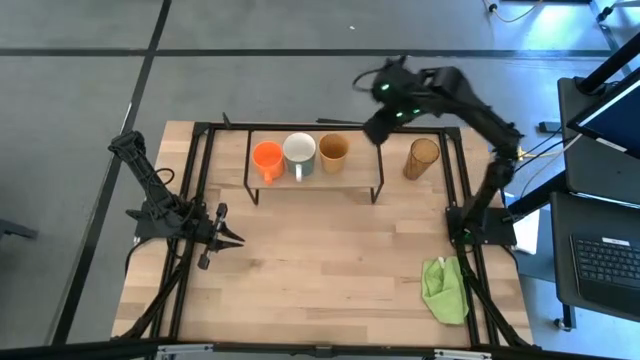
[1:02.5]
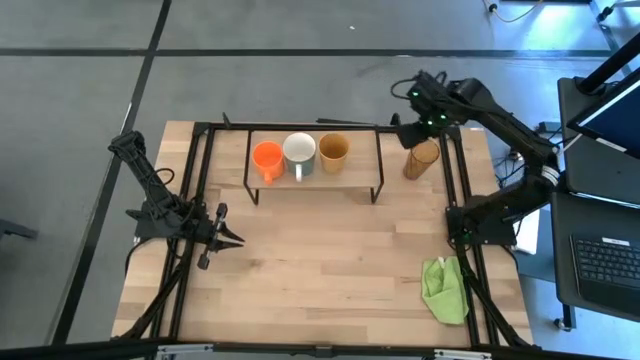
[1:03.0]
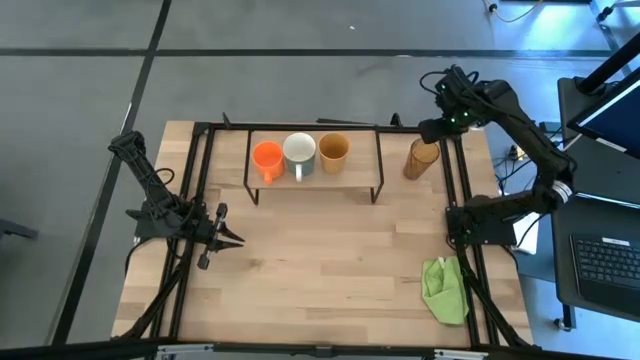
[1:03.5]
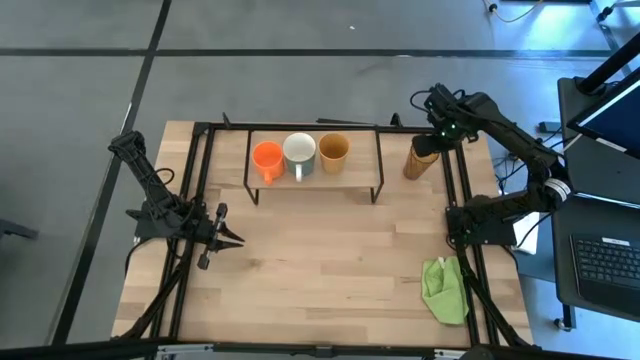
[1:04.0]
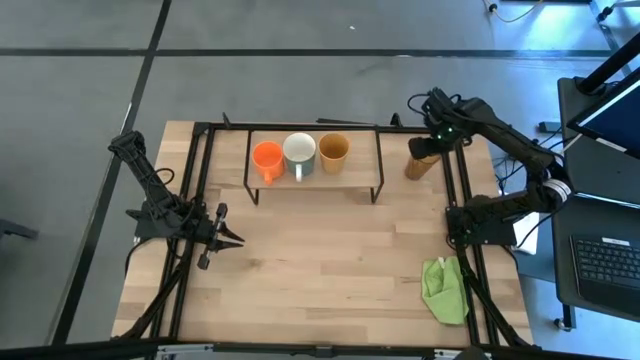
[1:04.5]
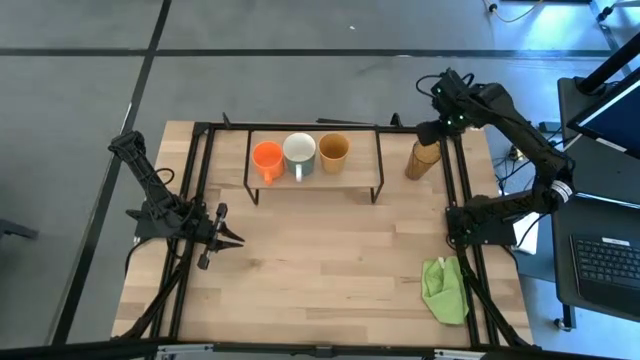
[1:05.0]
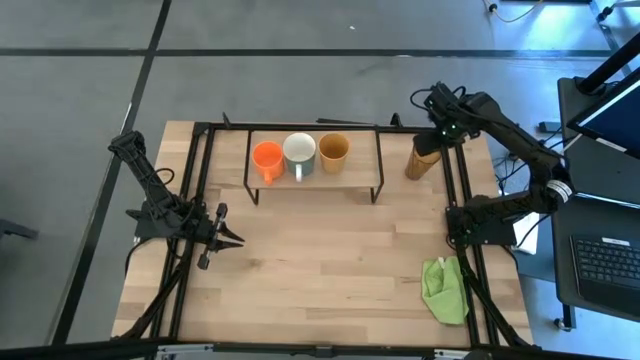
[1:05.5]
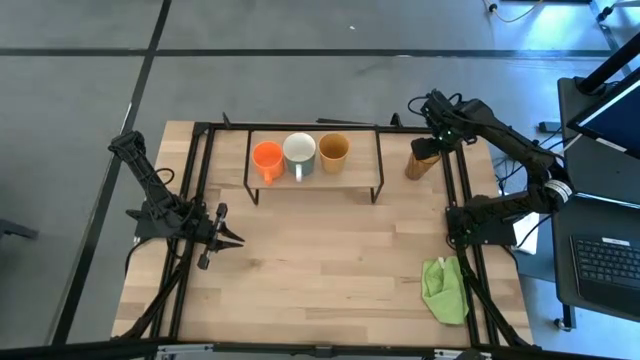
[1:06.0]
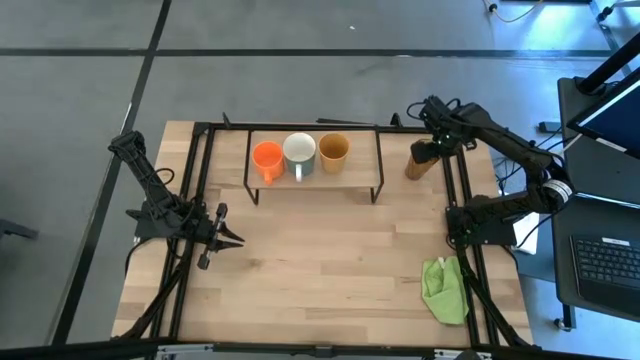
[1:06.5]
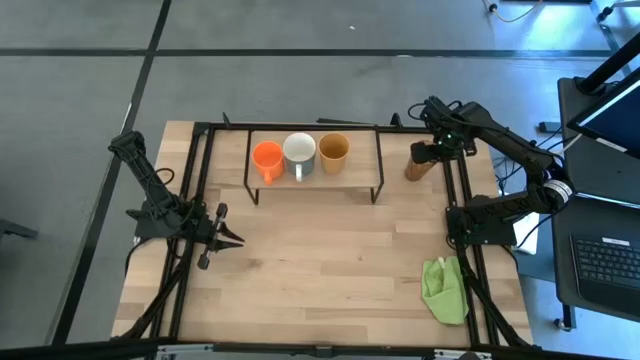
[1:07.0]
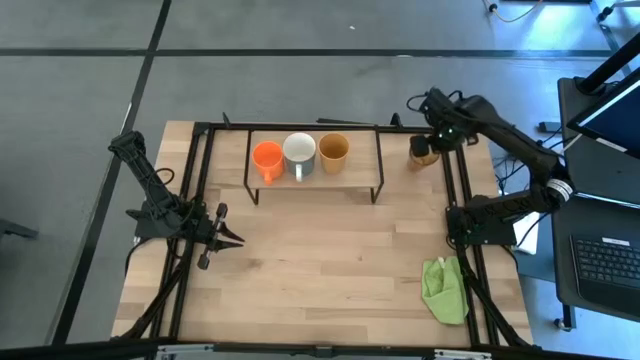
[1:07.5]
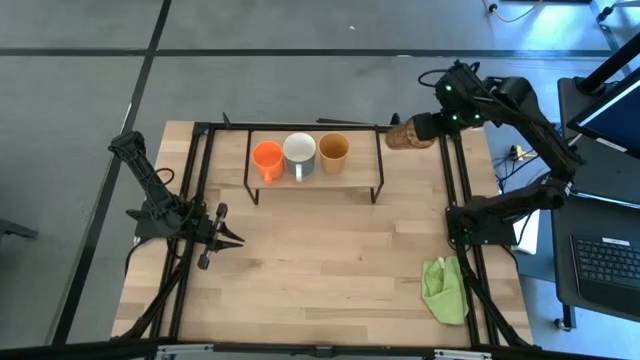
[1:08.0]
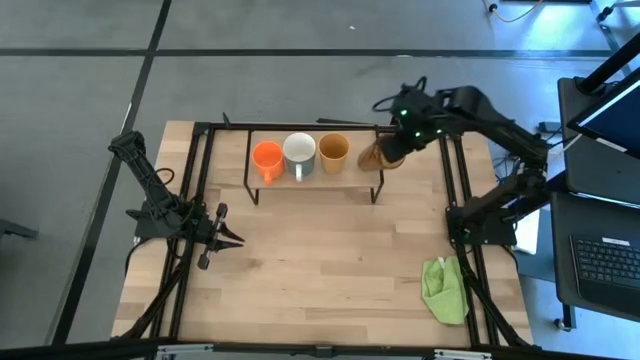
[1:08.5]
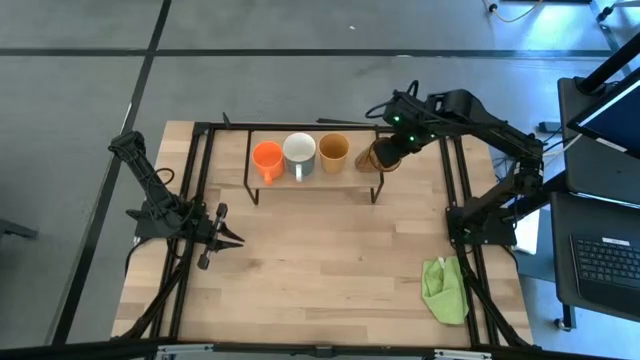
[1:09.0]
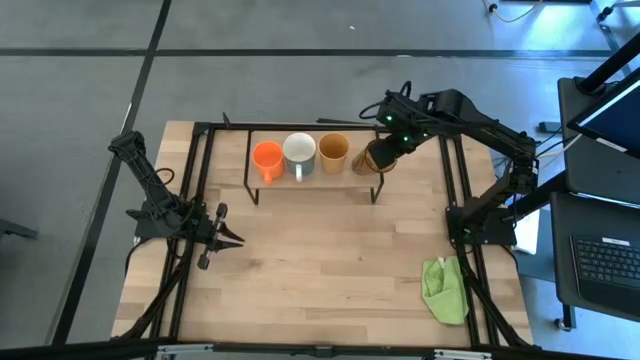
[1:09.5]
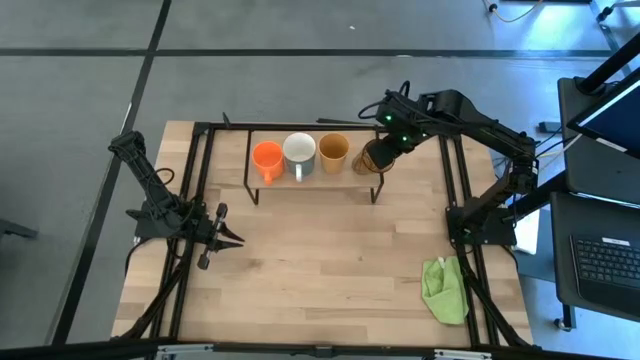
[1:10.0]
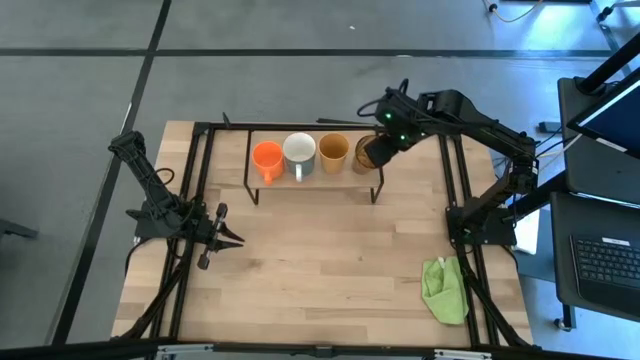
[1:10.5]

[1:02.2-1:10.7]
Task: Stack small to large cups/mugs on shelf
Put the brown cup on the shelf

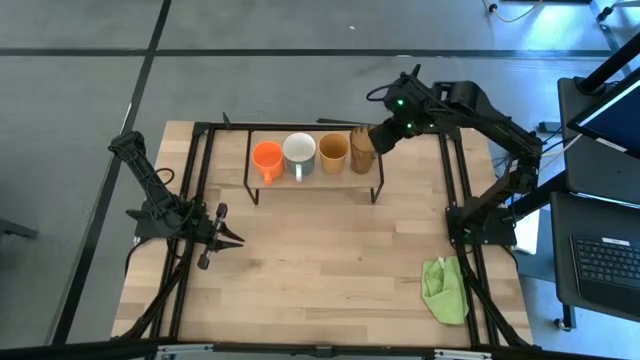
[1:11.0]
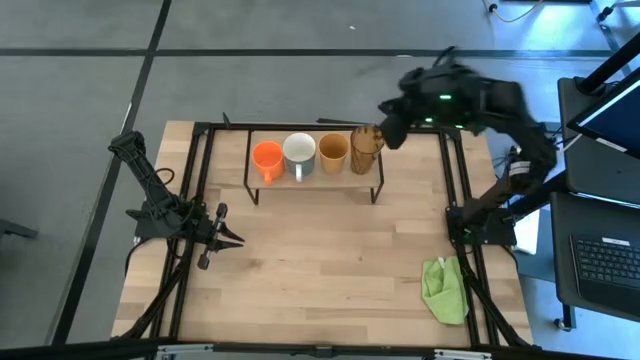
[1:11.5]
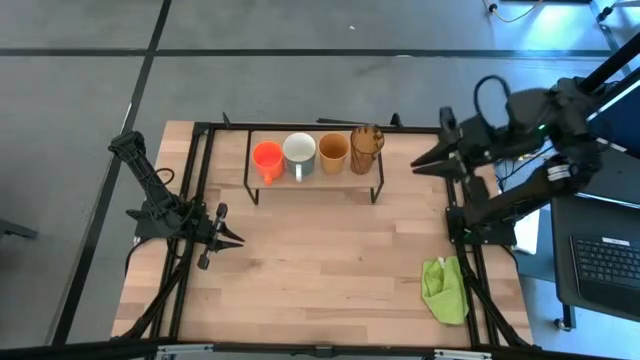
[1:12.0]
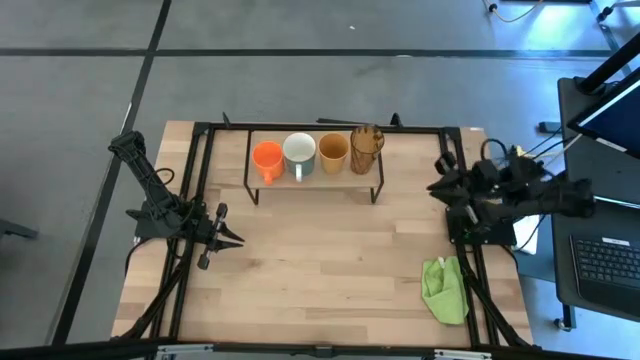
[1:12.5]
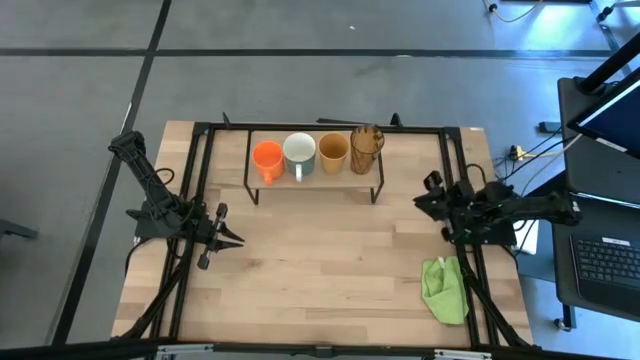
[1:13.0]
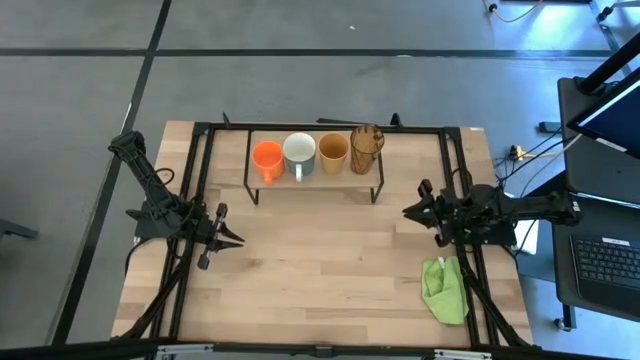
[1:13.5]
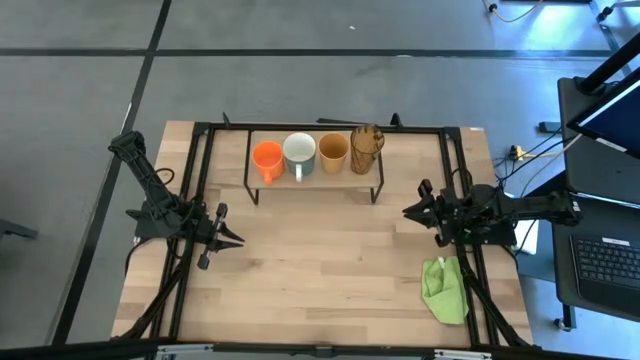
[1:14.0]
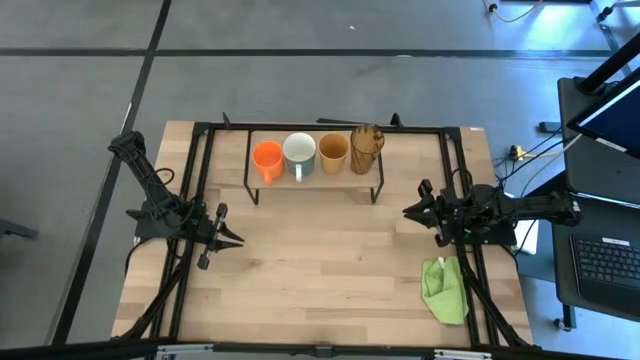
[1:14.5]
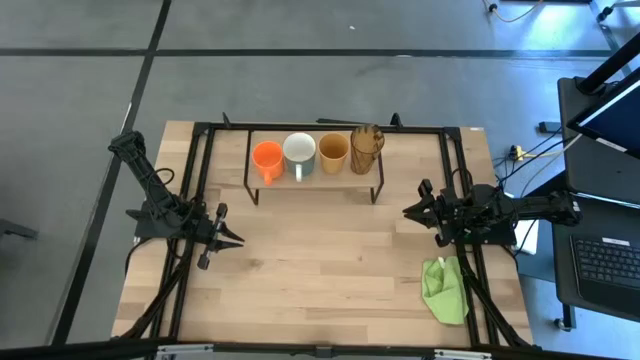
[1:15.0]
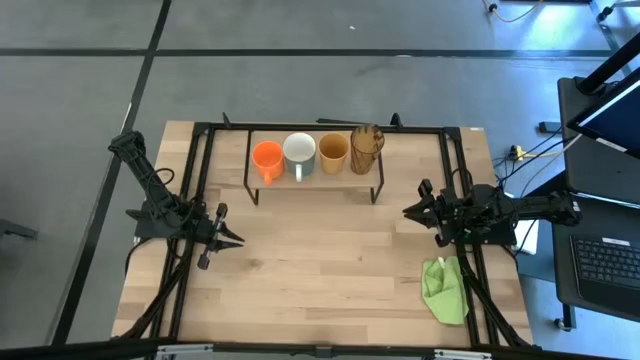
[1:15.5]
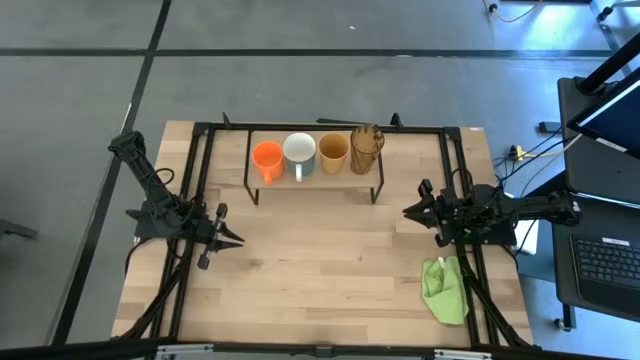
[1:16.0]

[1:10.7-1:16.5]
Return to Home Position

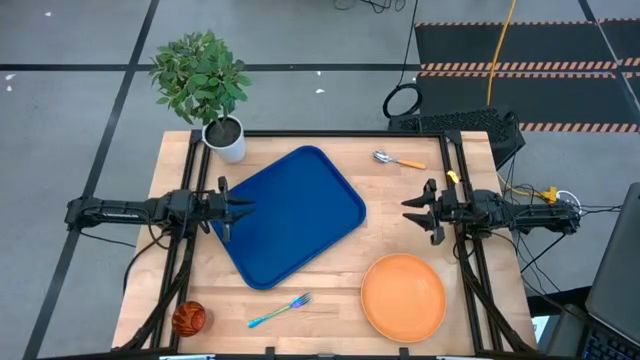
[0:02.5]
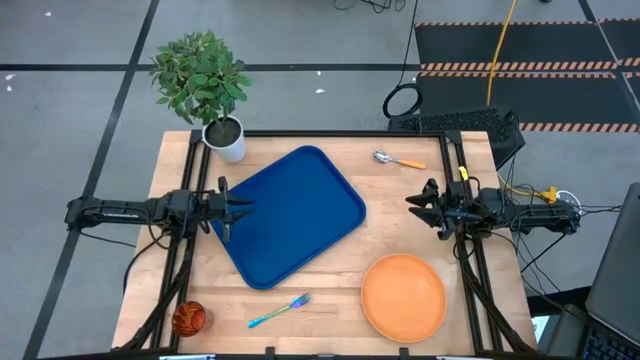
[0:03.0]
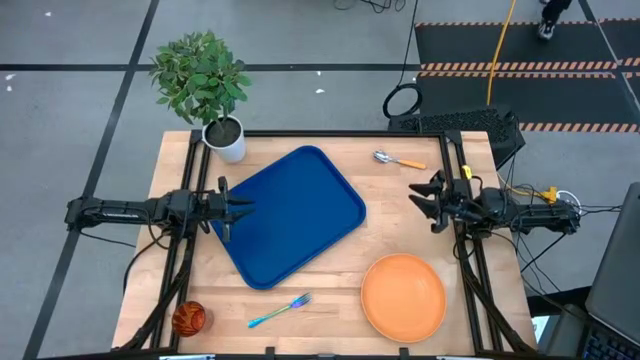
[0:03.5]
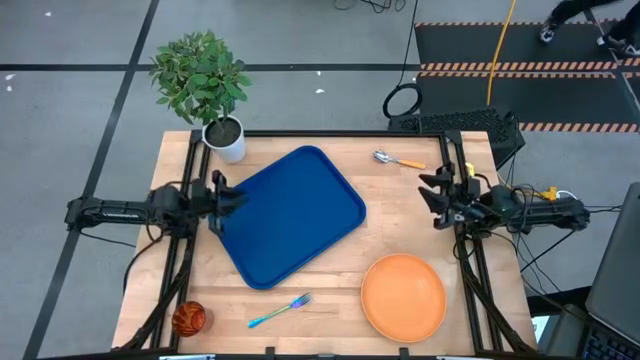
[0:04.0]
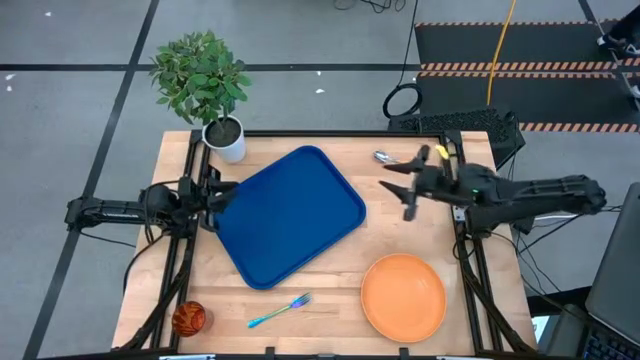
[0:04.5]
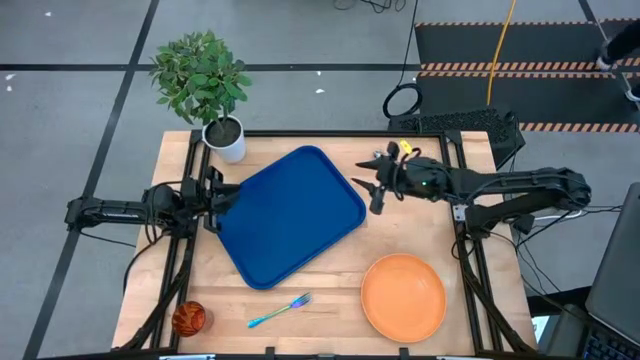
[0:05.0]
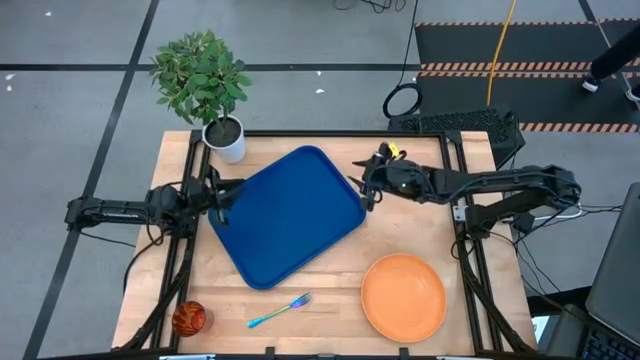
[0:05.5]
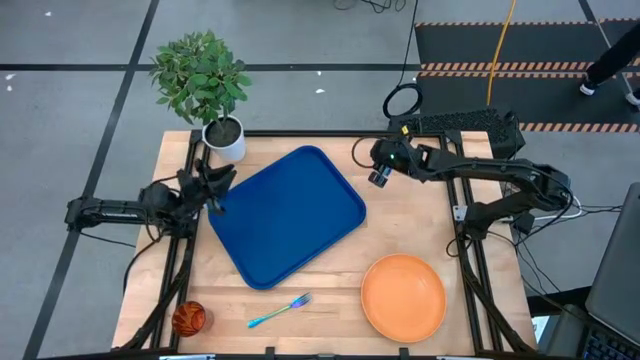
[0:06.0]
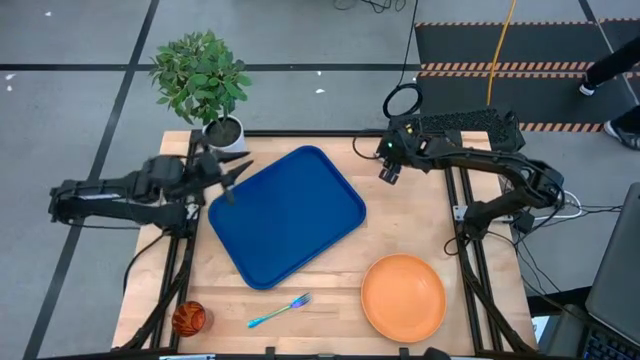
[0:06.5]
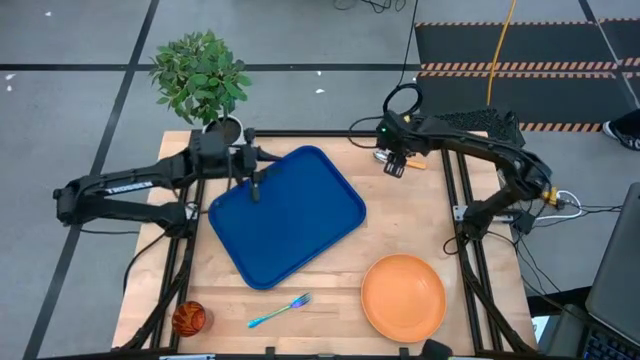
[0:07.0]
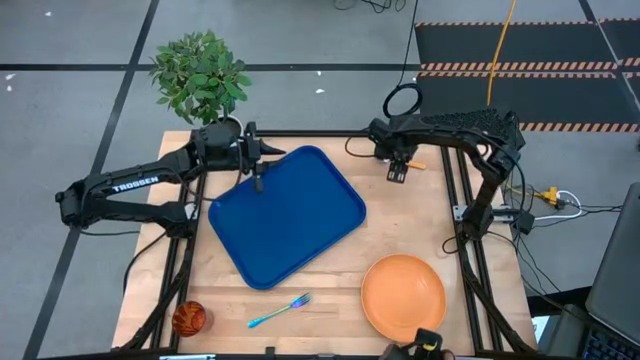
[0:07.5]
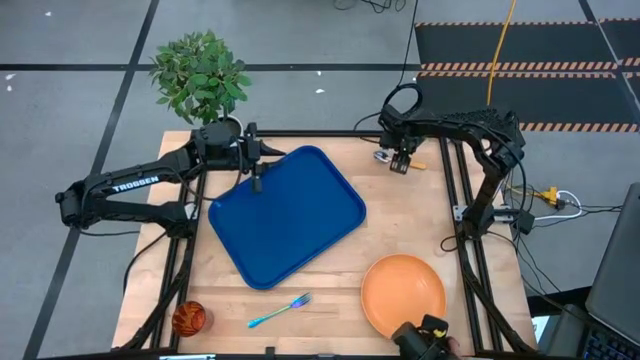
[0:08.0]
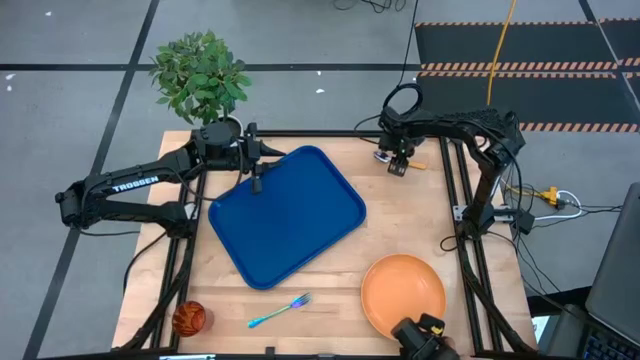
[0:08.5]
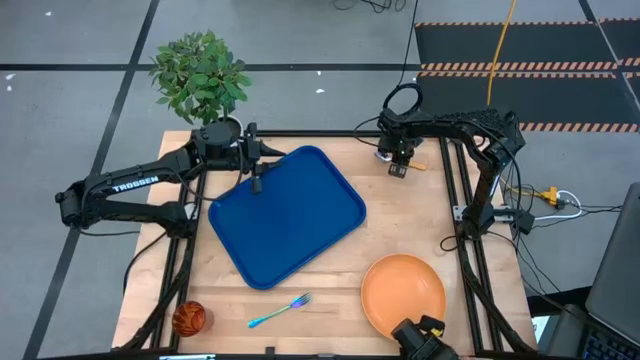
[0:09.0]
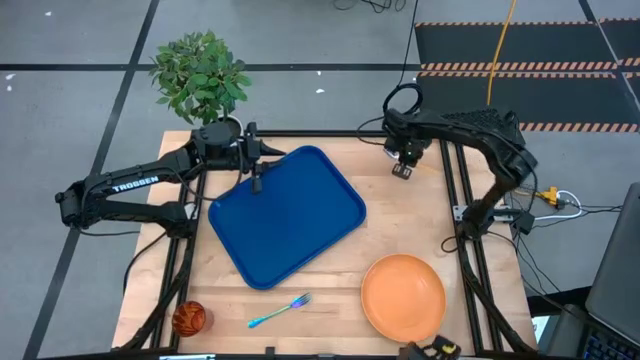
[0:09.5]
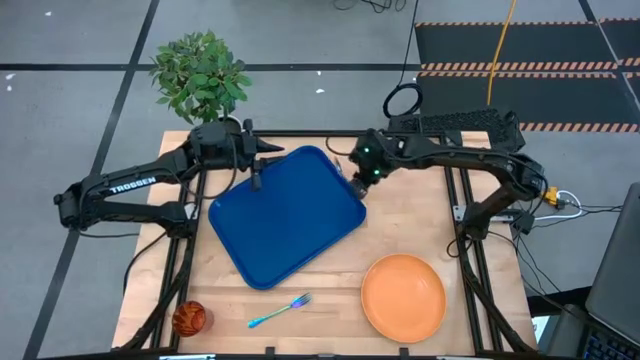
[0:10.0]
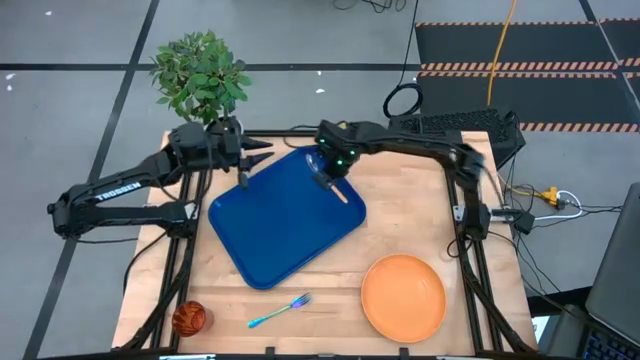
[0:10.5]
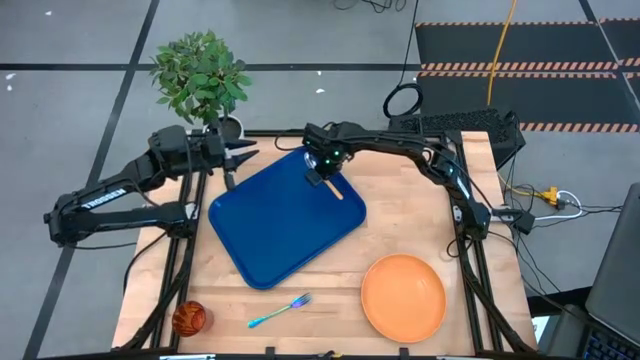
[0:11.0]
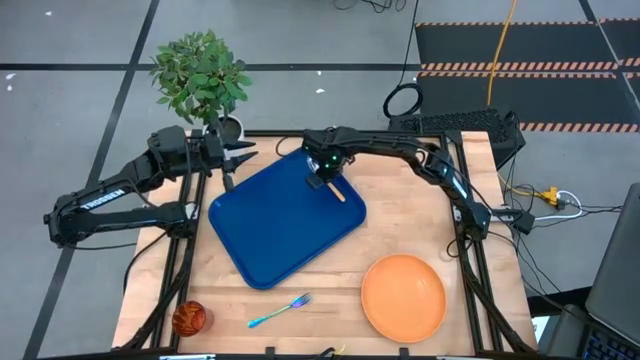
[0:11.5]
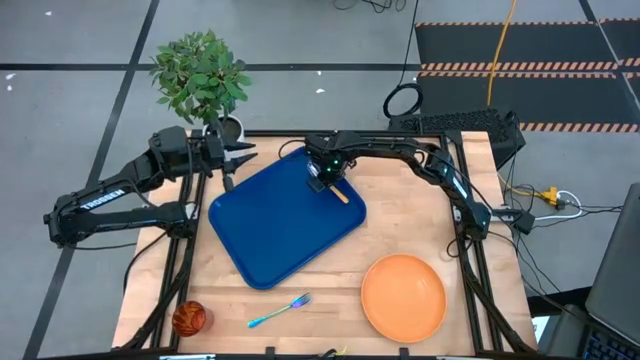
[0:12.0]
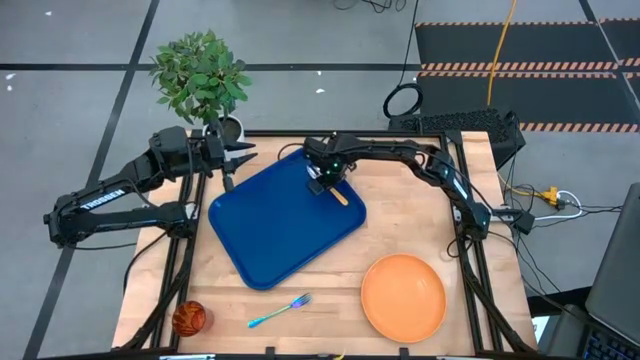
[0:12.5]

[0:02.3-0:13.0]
Task: Pick and place plate/cup/fork/spoon on tray
Put the spoon on the right side of the serving tray
